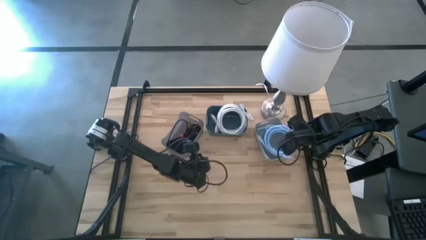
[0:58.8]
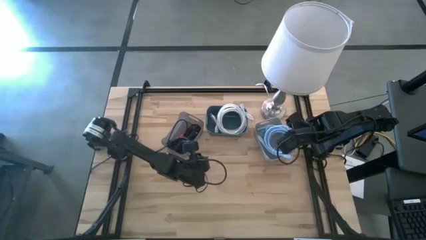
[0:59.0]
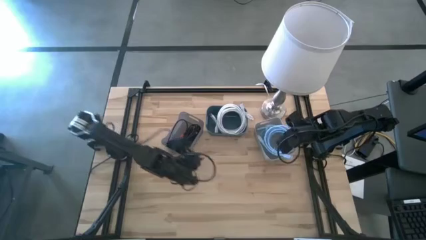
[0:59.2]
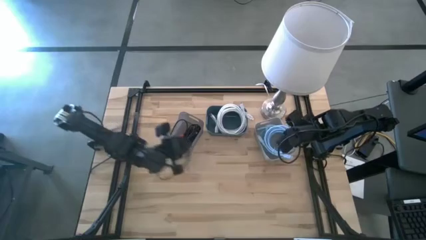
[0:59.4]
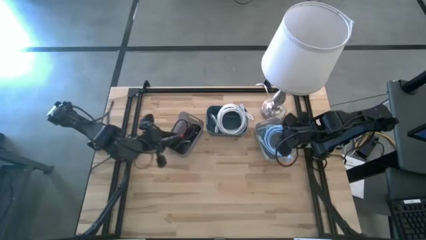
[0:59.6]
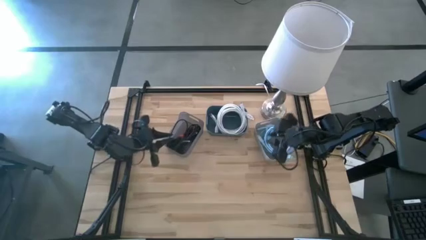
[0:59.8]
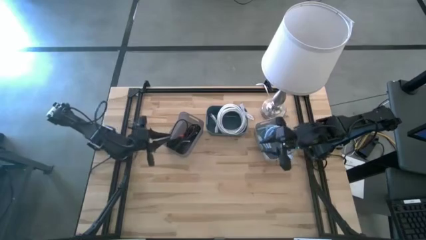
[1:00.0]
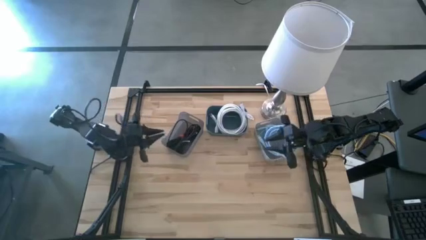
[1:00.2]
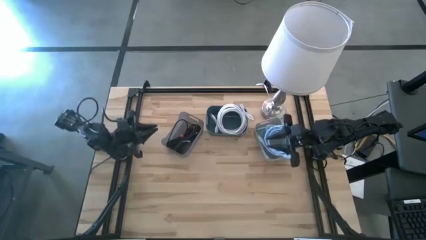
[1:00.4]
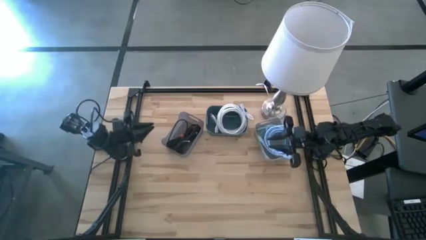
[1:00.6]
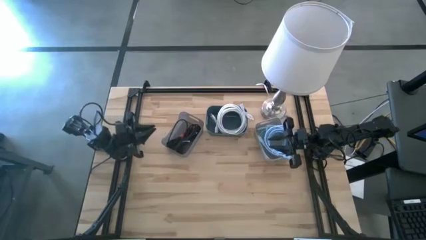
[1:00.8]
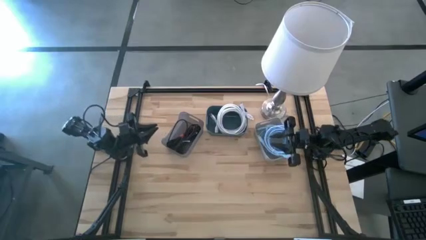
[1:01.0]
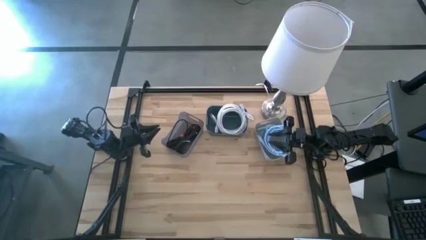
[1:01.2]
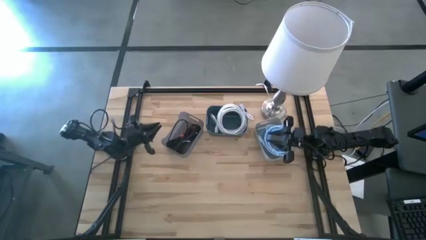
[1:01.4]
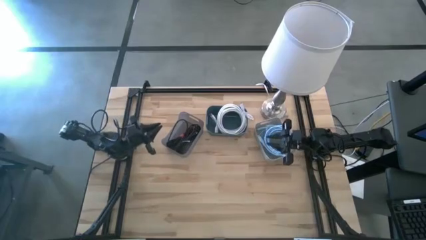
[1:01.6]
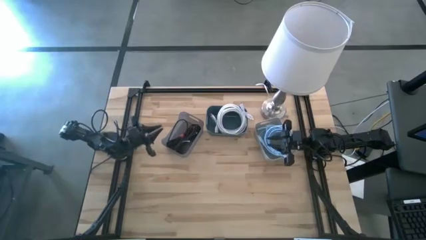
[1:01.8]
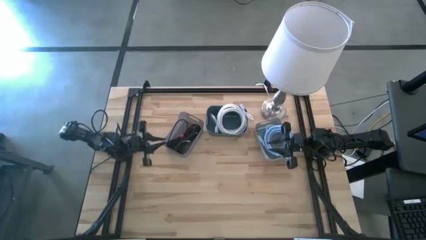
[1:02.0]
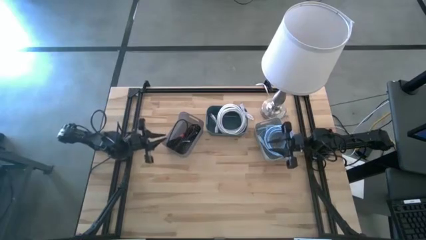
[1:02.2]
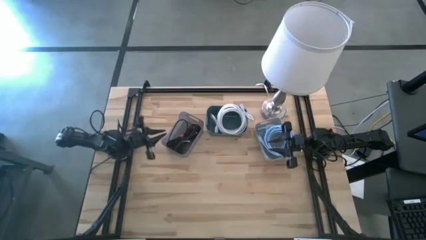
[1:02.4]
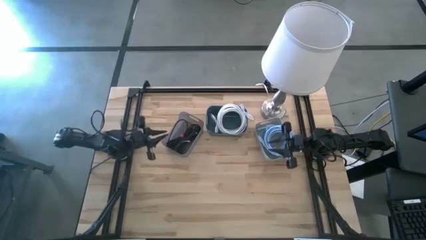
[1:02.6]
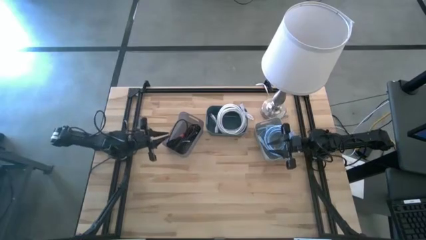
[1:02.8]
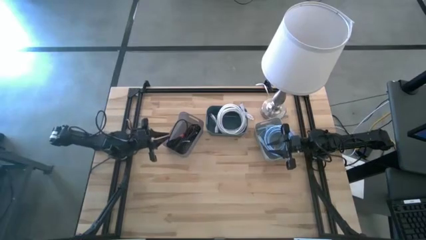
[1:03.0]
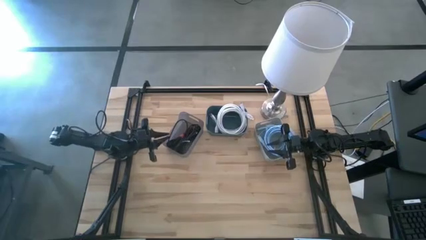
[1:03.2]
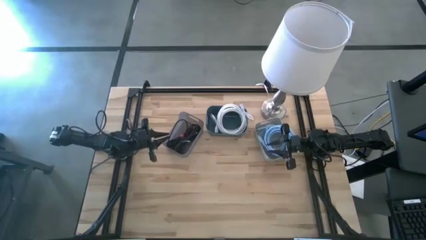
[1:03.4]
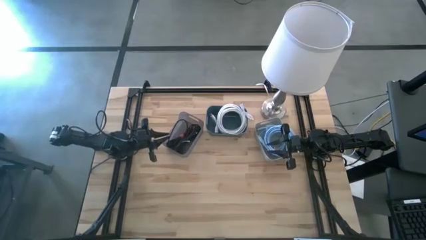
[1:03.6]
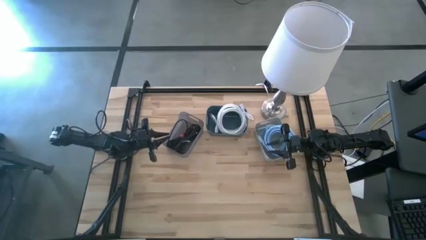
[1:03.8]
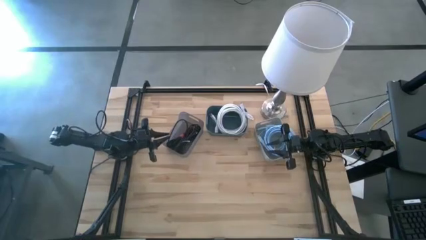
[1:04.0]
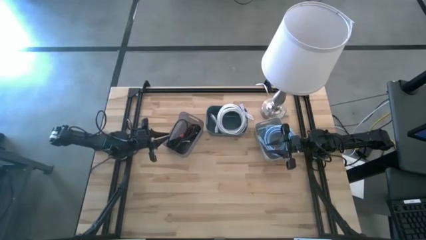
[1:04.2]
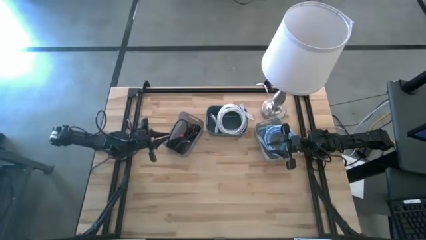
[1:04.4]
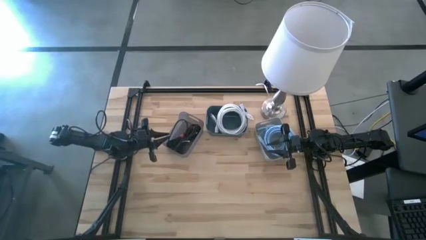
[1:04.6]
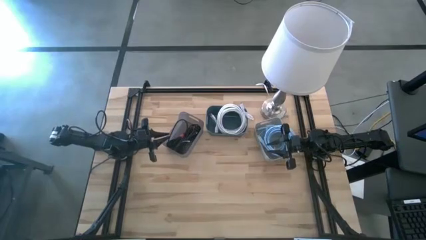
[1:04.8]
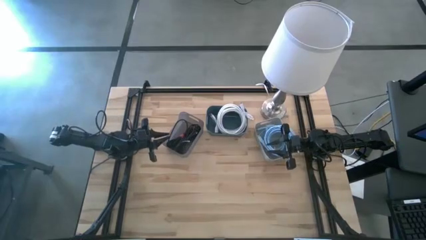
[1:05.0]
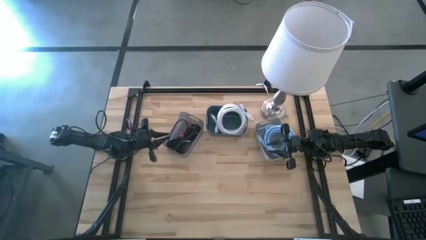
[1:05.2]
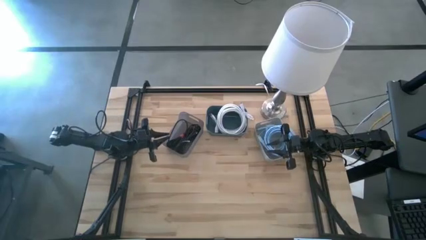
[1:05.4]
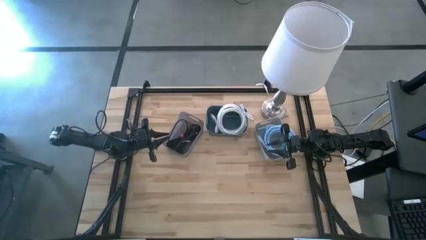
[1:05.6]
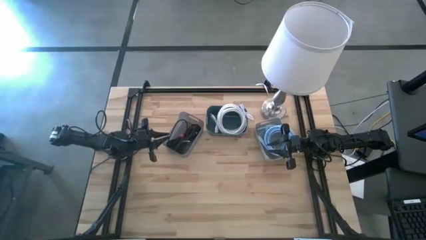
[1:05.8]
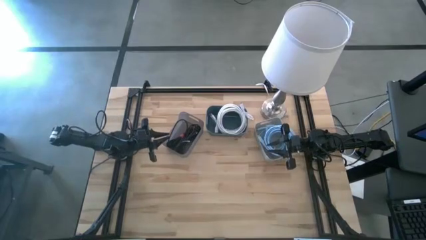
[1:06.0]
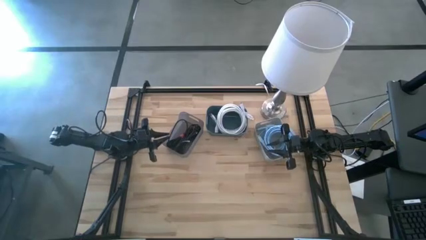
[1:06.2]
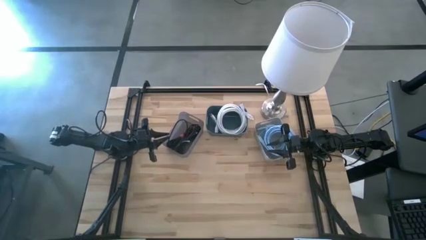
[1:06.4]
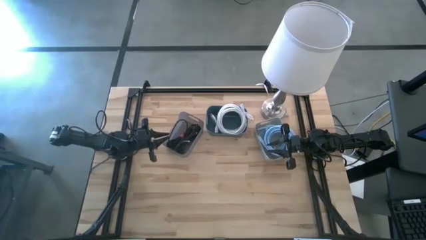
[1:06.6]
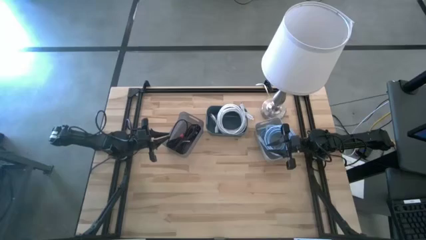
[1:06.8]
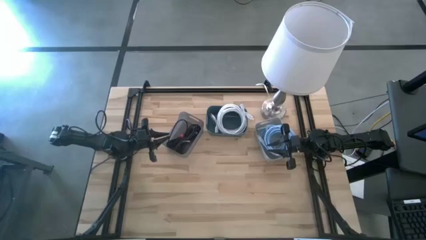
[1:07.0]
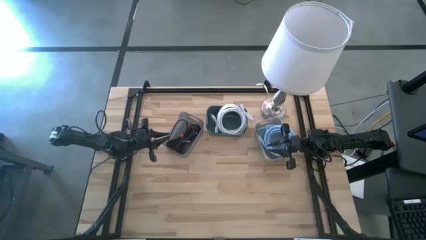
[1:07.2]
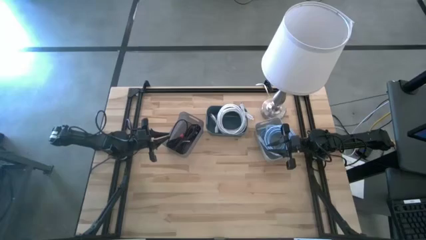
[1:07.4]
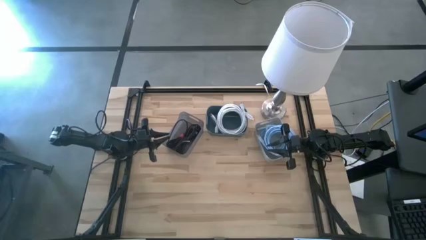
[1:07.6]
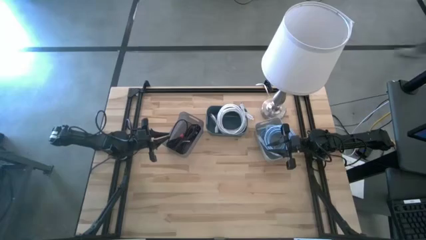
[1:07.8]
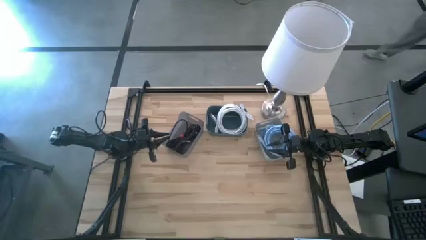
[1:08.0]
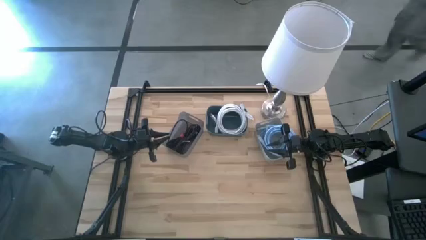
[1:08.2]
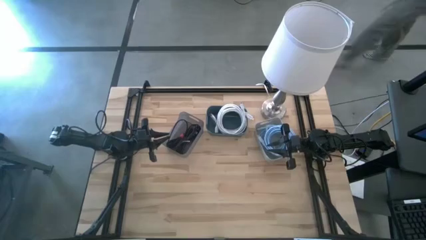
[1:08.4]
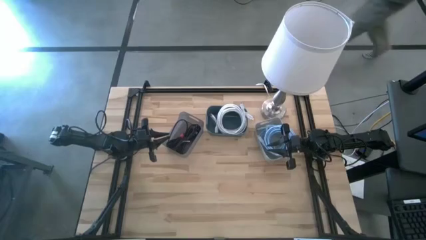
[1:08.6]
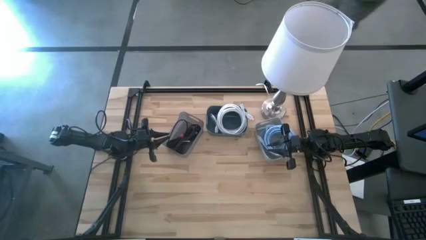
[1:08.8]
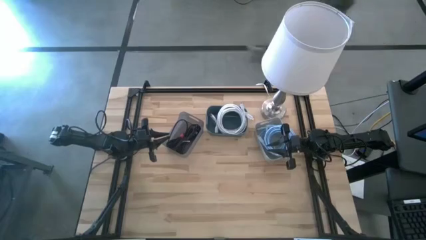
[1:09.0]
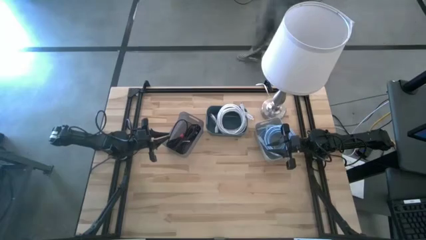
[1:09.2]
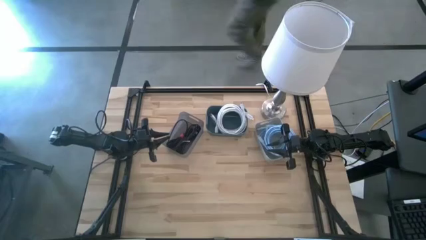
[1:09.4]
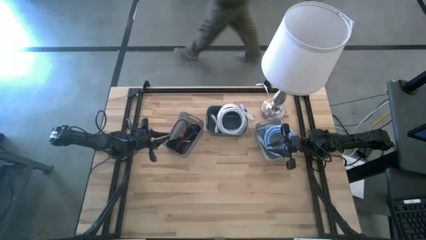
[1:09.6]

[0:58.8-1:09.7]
Task: Sort HDMI cables
Return to Home Position
